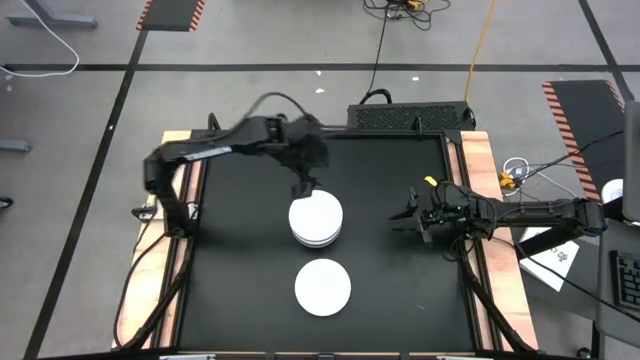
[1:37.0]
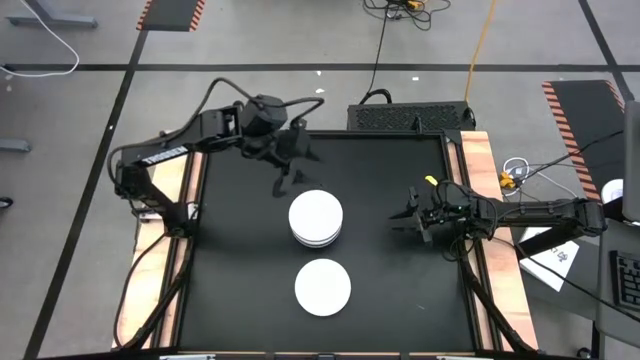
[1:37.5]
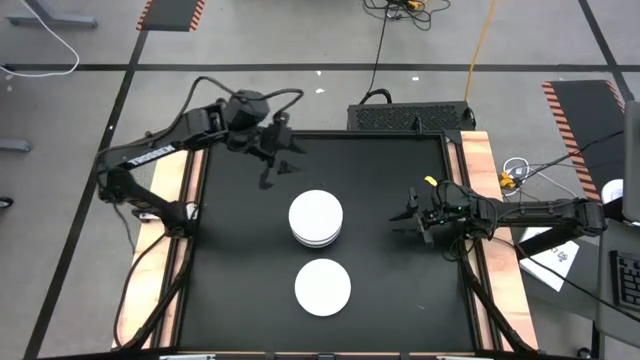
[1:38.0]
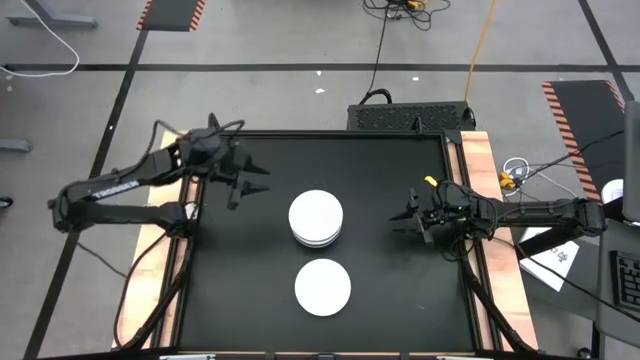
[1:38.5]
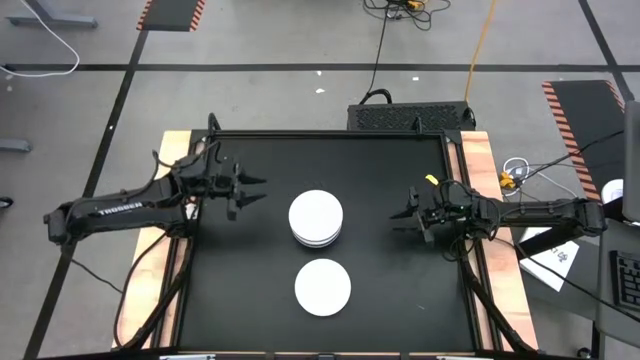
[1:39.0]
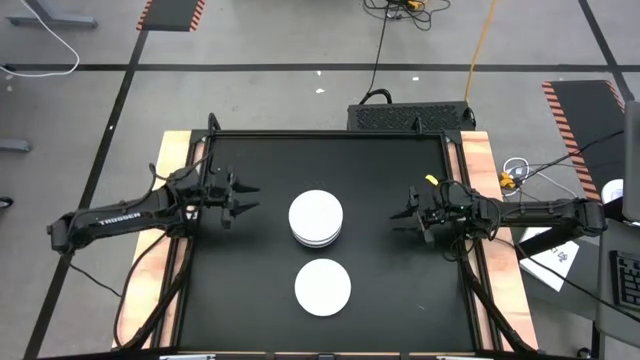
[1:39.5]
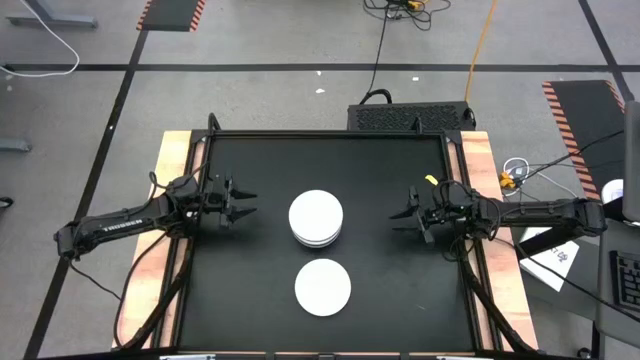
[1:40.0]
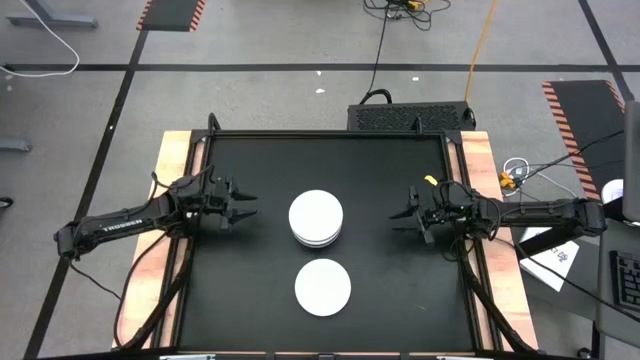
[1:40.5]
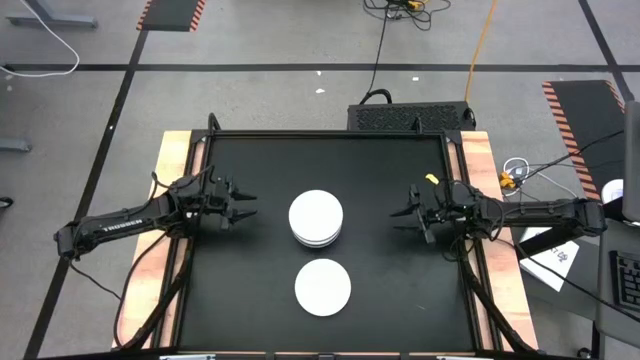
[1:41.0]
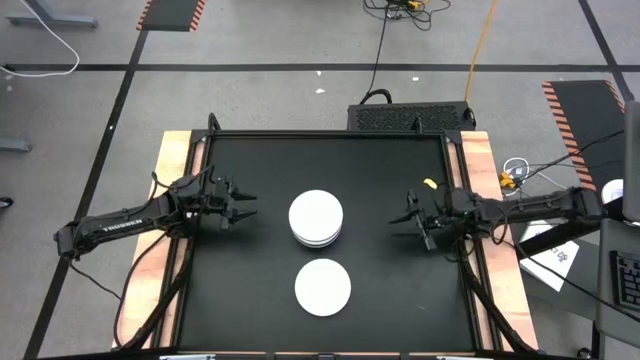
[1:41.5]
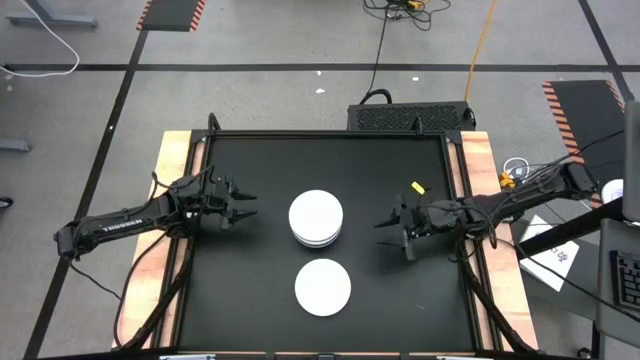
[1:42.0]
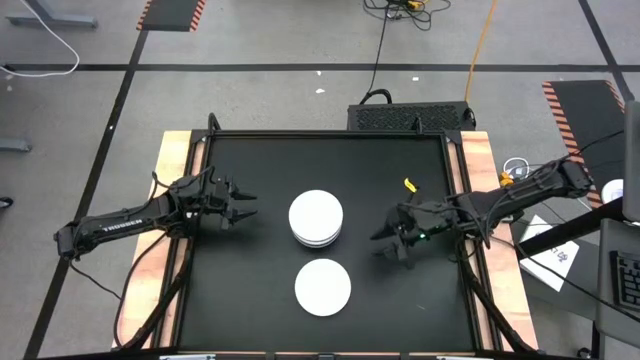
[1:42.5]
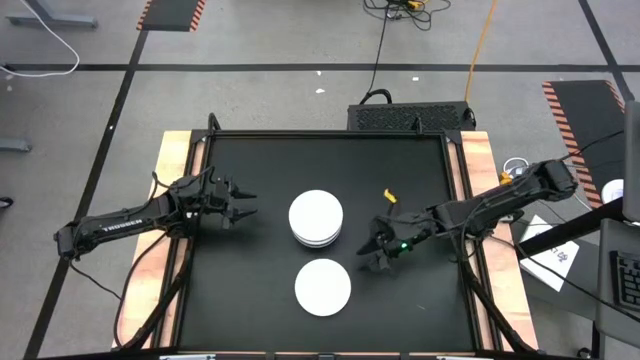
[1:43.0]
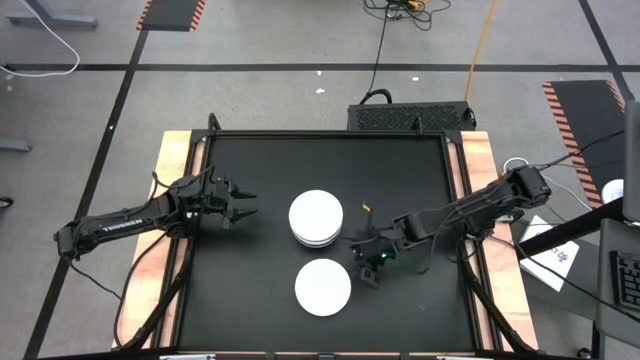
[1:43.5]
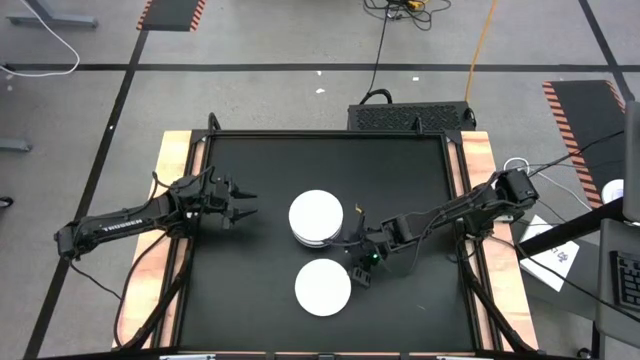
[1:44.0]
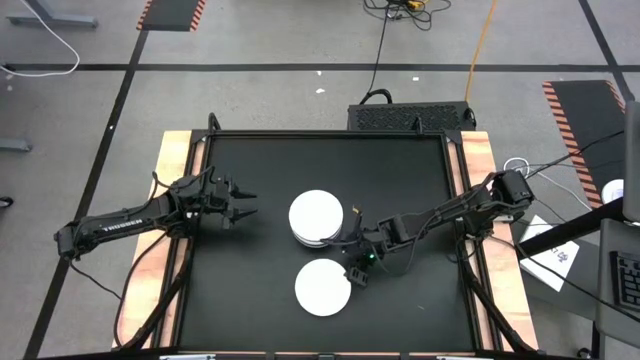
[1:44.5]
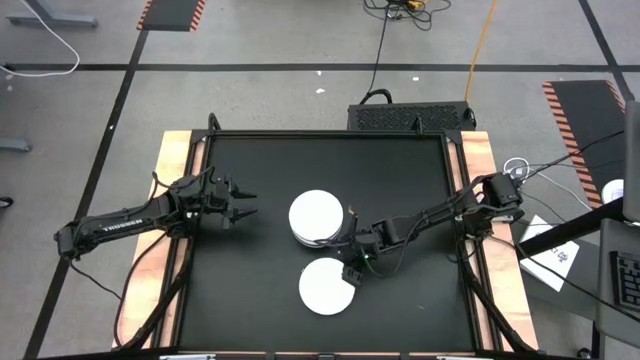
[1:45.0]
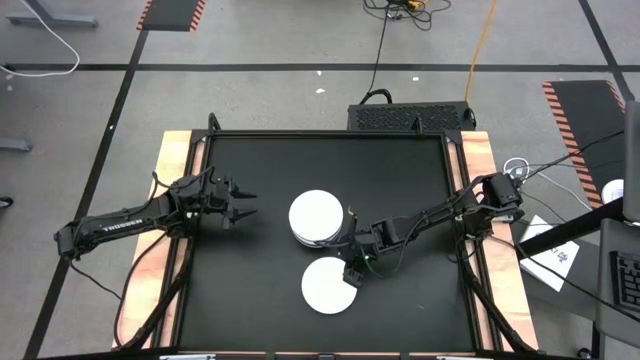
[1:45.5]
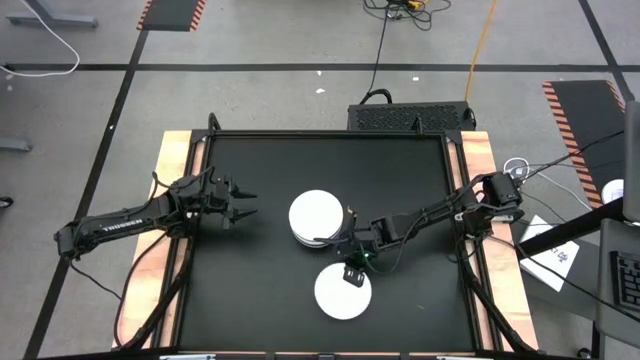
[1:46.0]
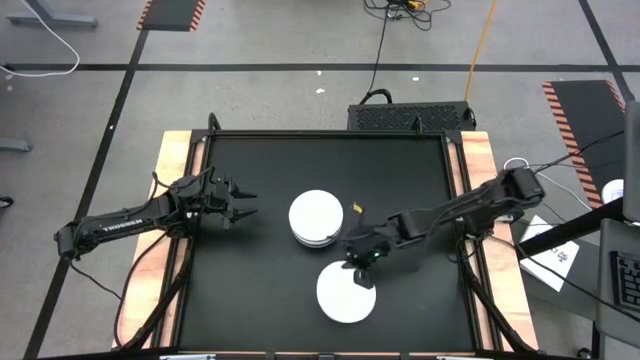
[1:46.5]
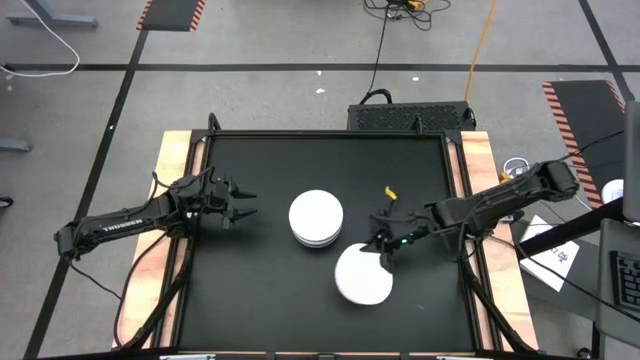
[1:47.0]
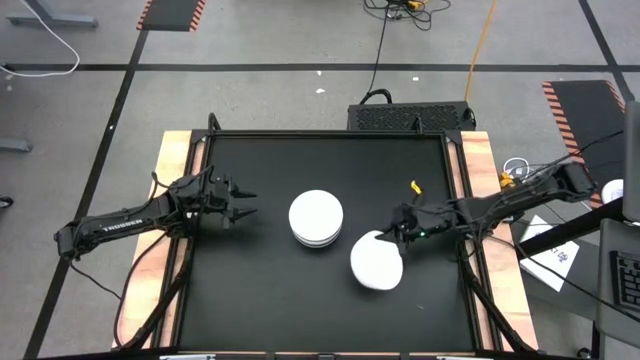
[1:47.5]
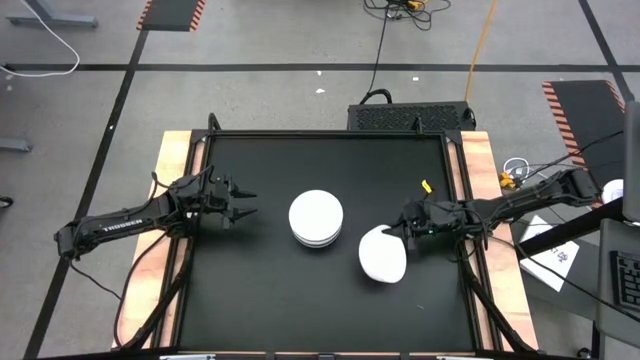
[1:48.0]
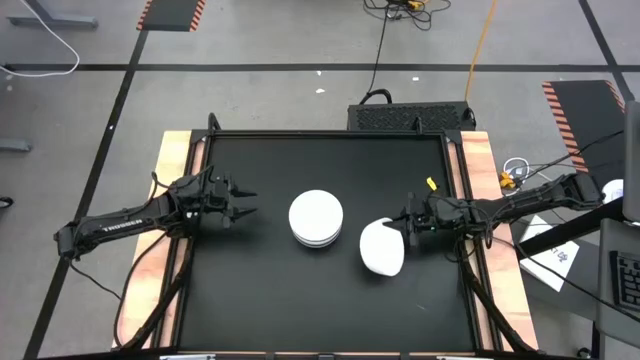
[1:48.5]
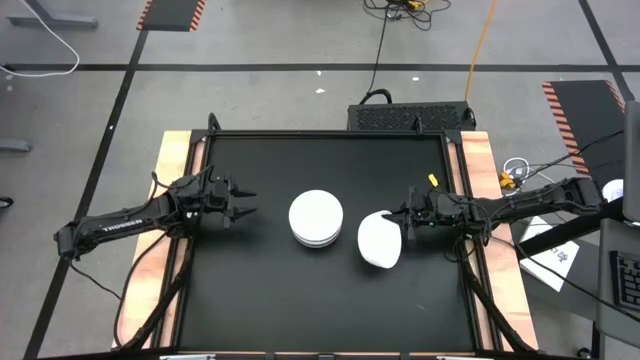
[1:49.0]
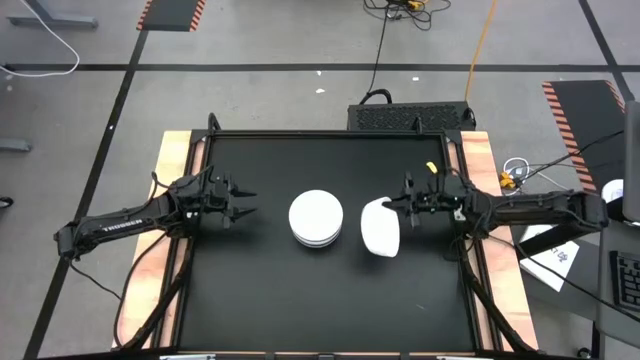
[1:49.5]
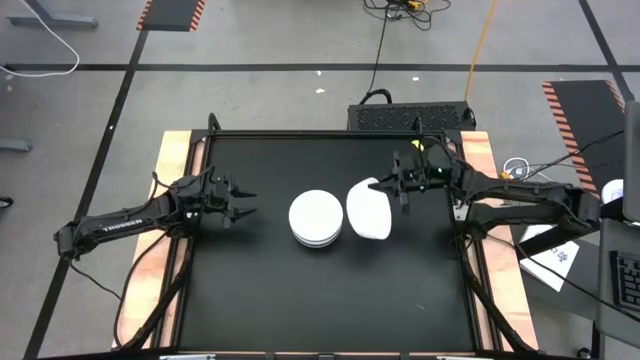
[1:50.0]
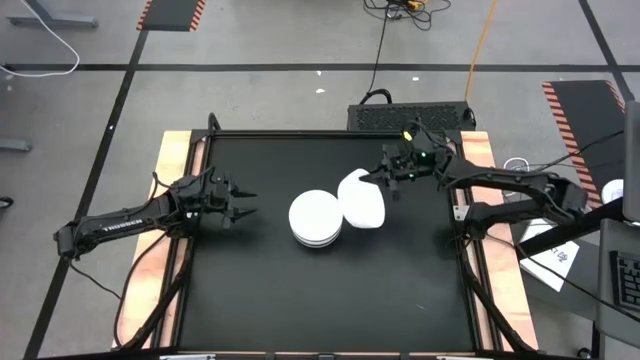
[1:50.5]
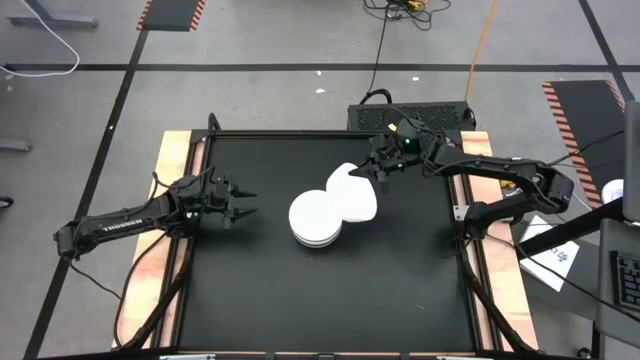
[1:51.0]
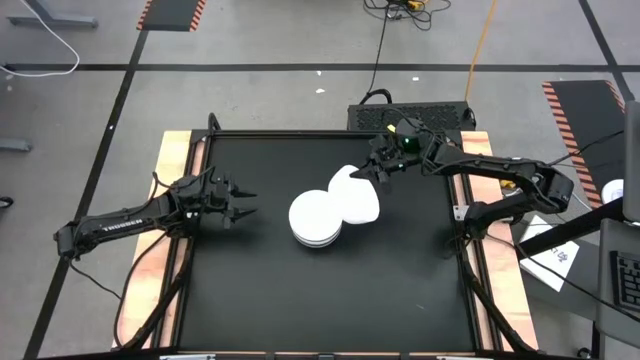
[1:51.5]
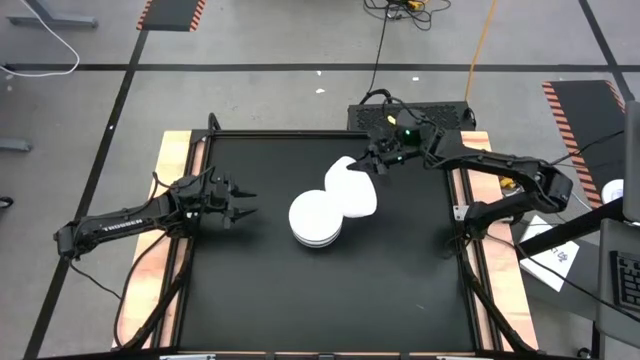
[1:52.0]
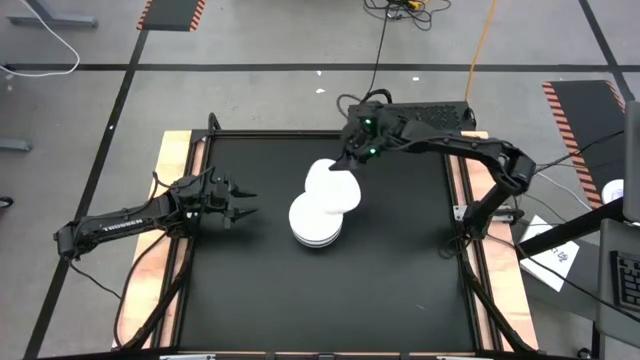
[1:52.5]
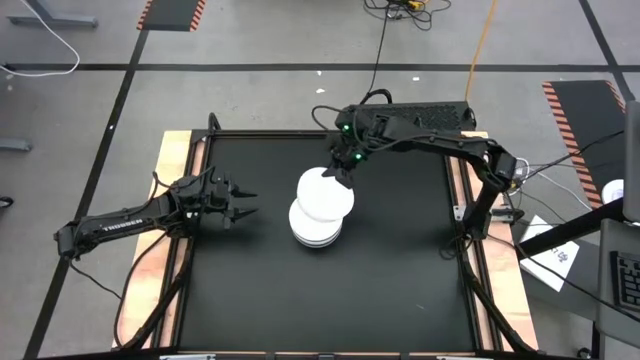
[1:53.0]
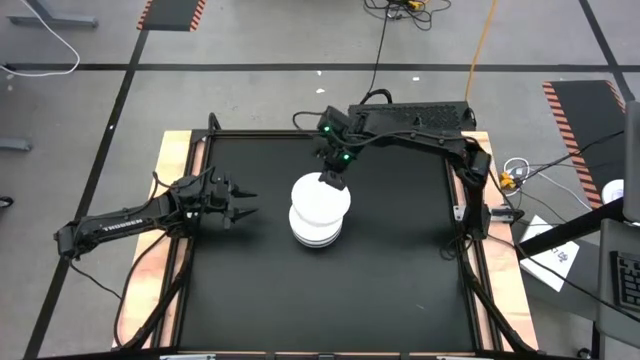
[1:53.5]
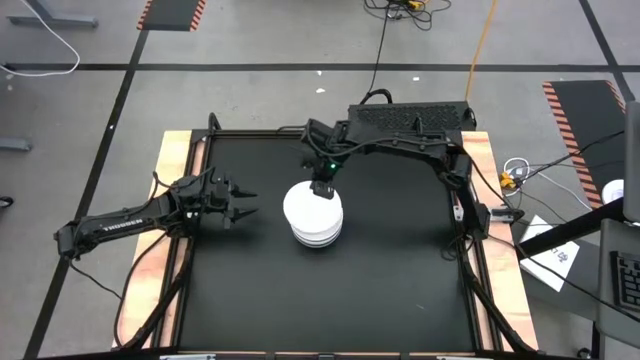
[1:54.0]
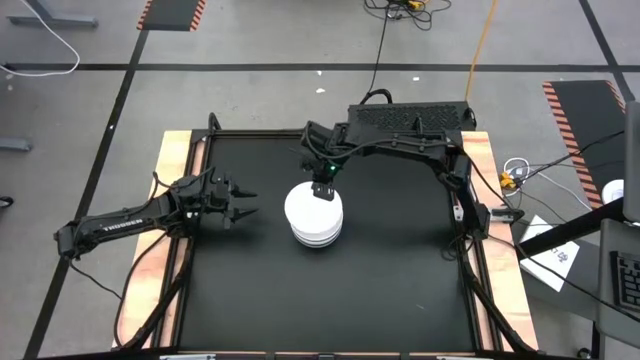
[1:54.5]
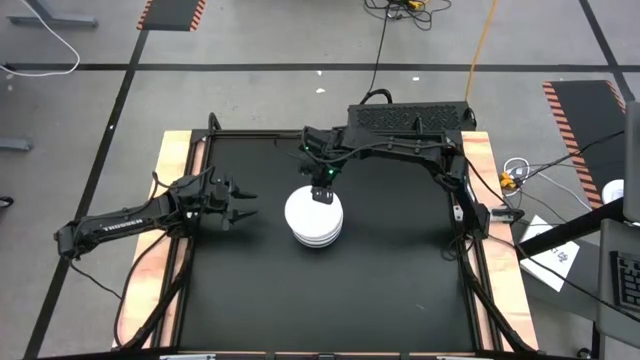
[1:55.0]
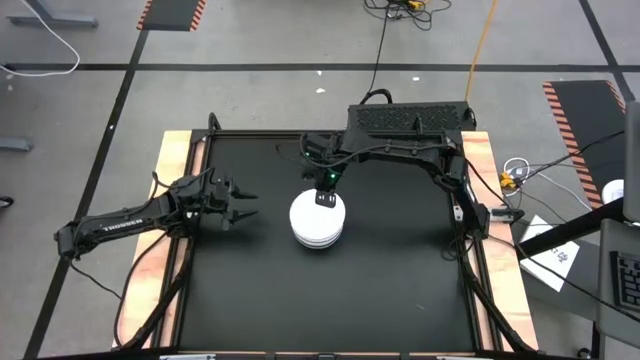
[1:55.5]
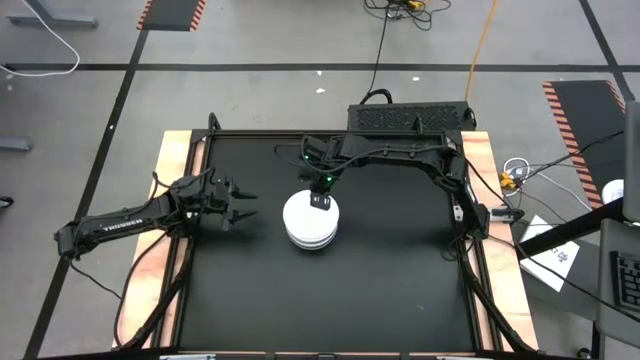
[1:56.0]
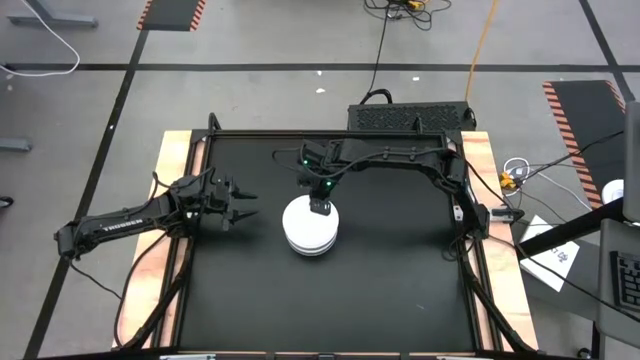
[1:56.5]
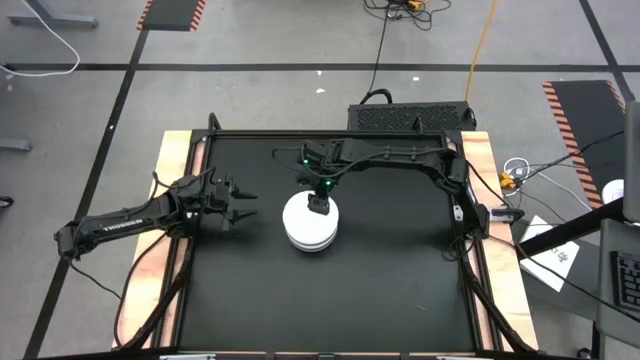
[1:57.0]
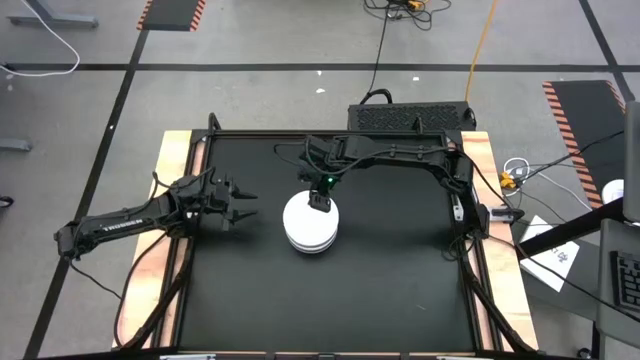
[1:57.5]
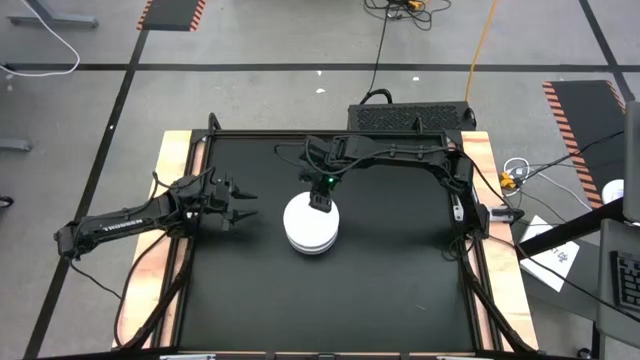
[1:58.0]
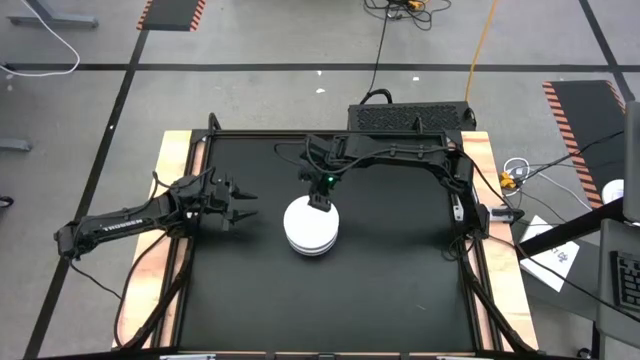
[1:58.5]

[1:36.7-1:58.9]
Task: Nest bowls inside each other
Stack the white bowl on top of the white bowl
